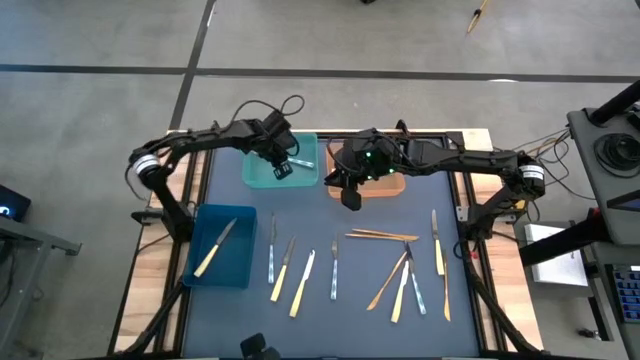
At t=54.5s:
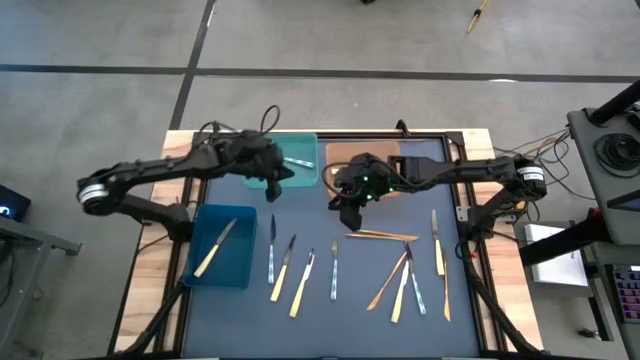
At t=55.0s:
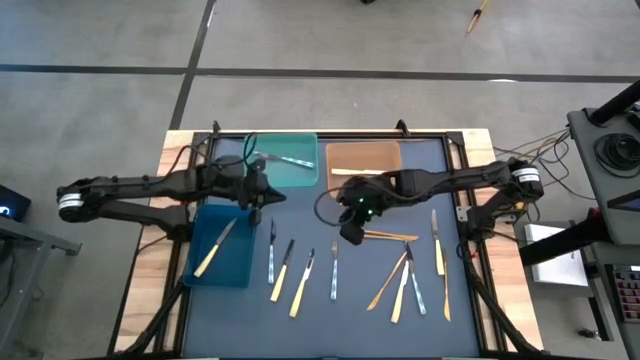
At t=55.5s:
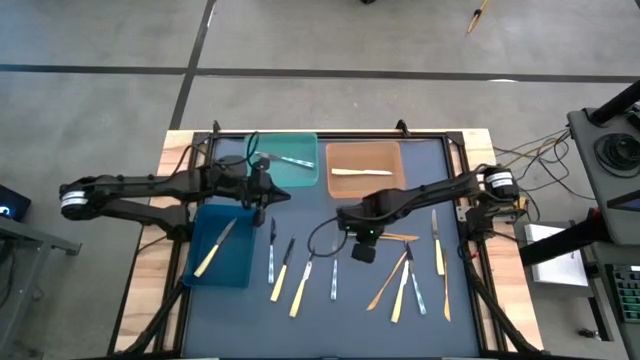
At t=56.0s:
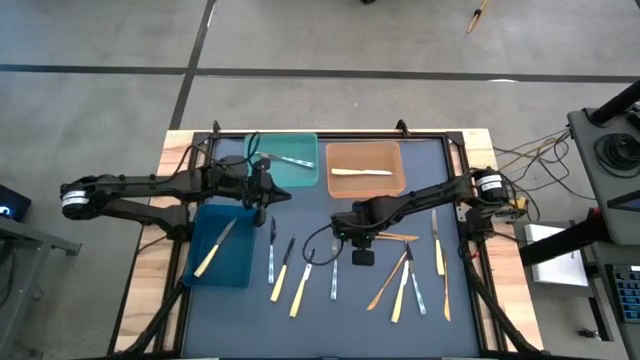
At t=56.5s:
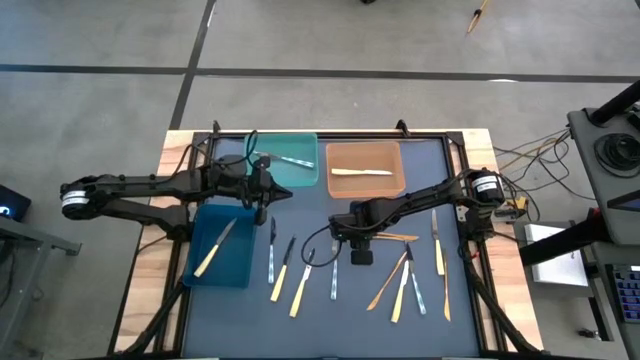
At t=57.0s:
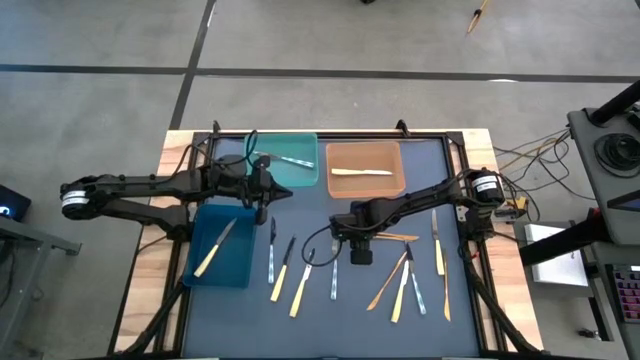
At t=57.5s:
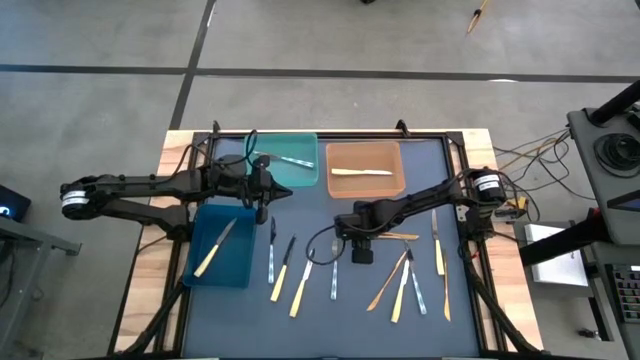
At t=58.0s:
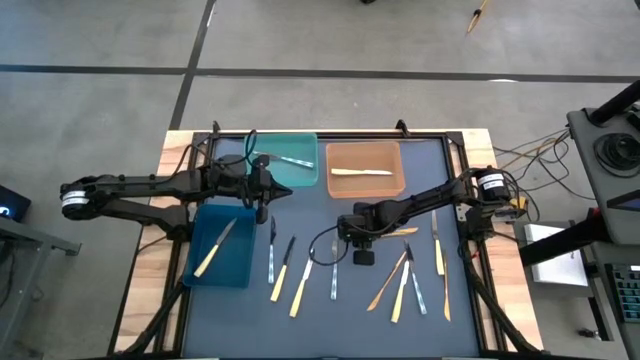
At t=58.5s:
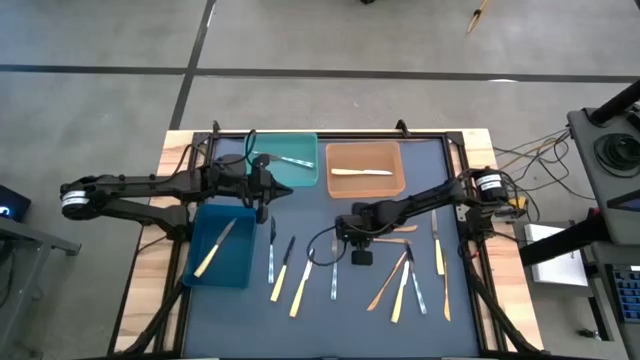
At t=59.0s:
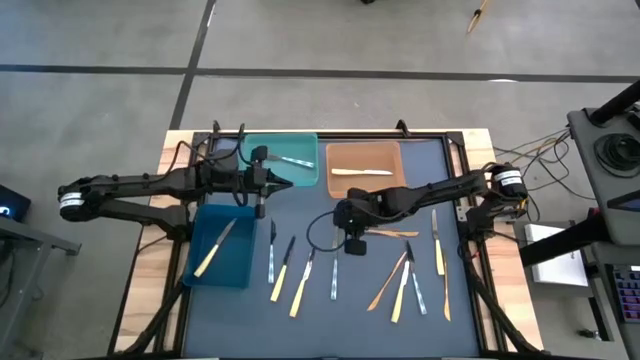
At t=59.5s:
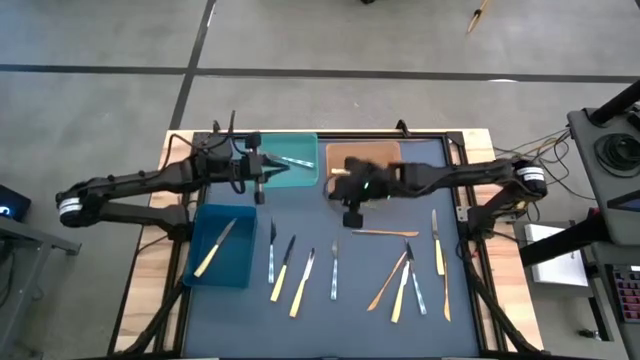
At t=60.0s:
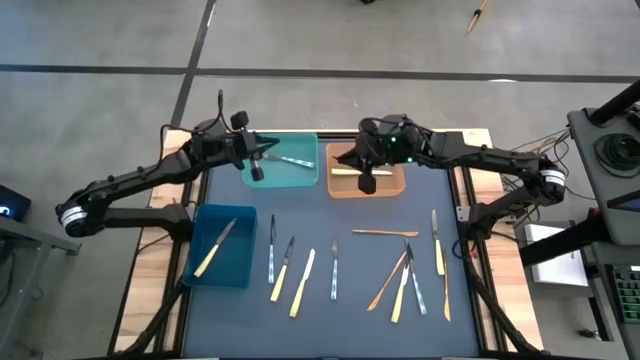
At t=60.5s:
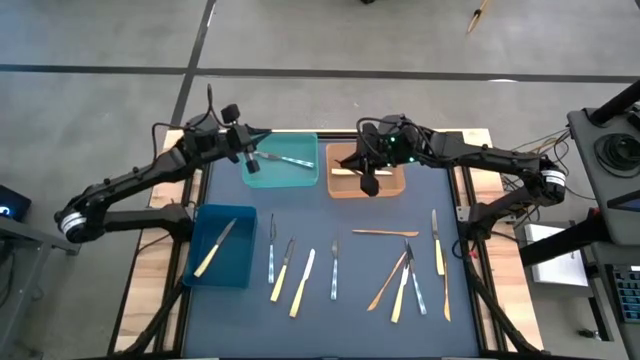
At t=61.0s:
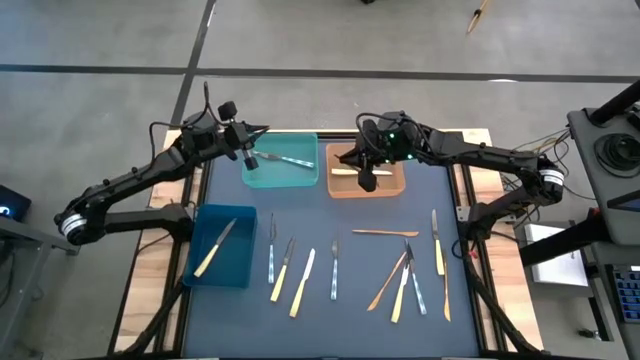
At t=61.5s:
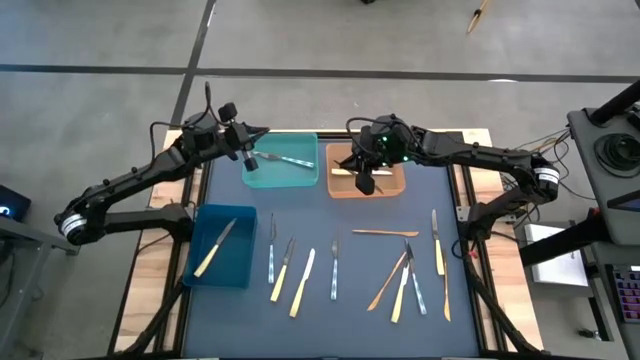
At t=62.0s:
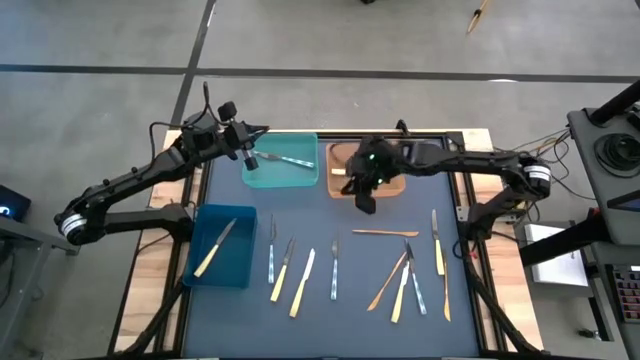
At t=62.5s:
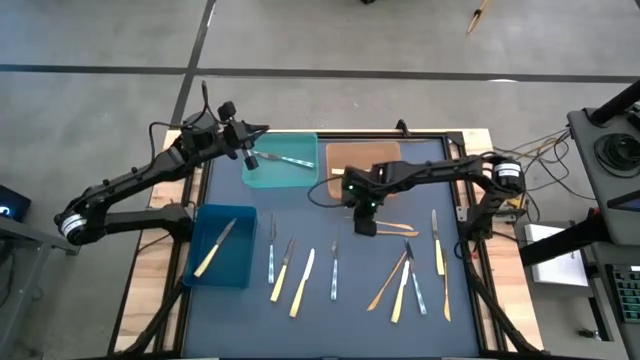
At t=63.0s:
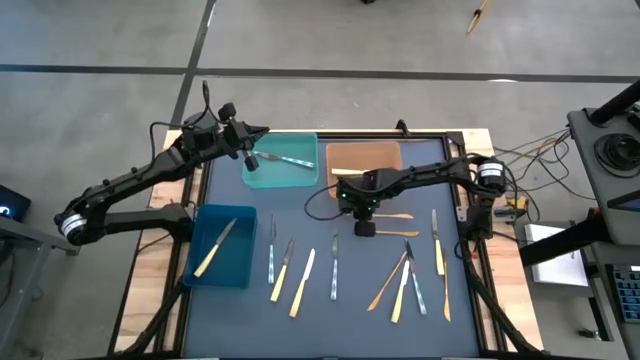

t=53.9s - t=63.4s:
Task: Sort silverware by color (type)
Put the golden knife in the orange bin

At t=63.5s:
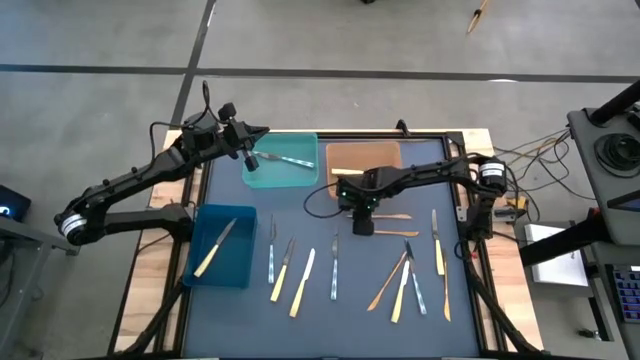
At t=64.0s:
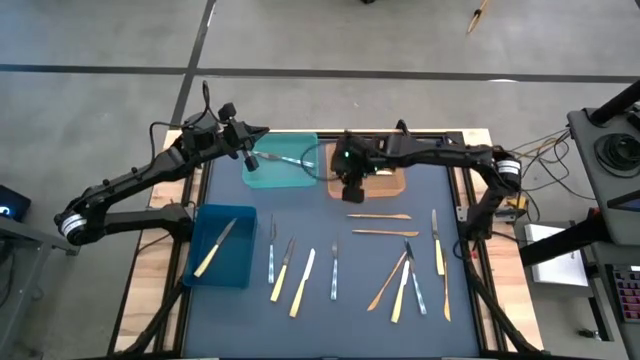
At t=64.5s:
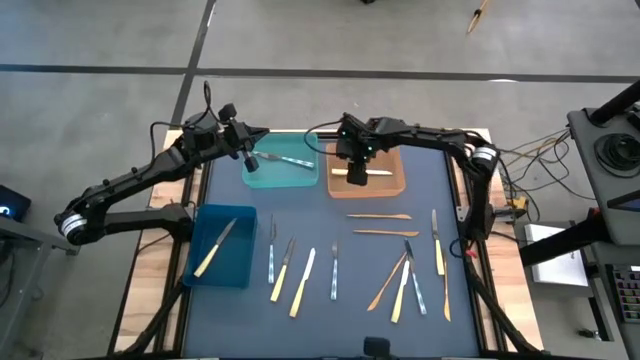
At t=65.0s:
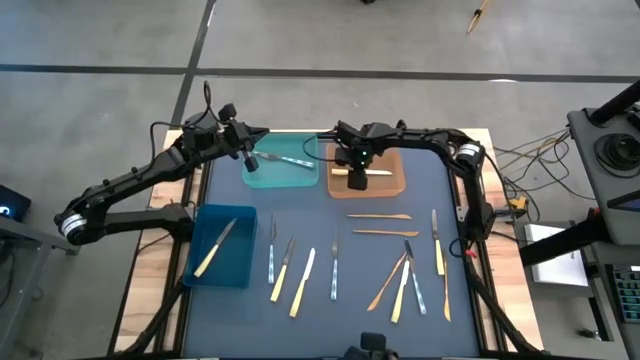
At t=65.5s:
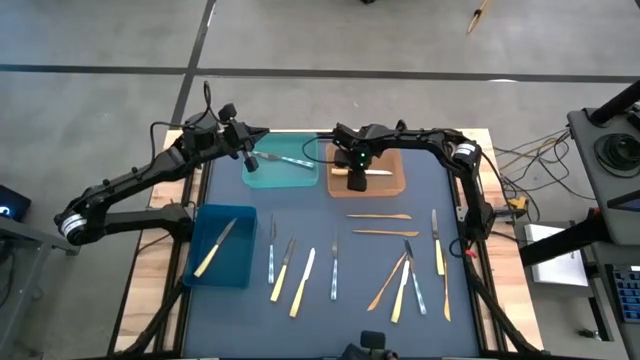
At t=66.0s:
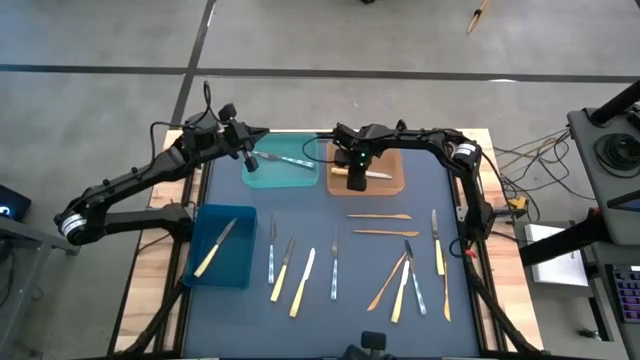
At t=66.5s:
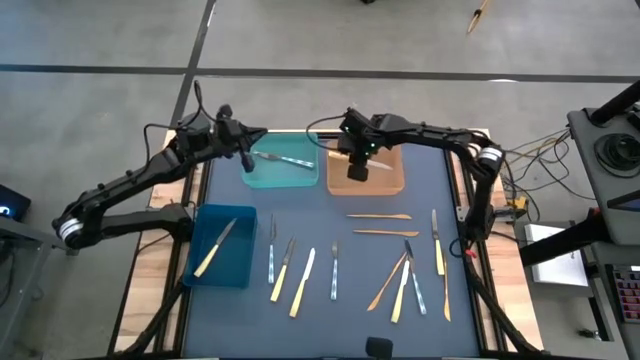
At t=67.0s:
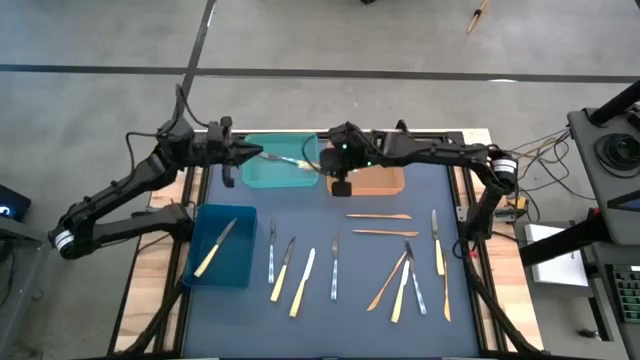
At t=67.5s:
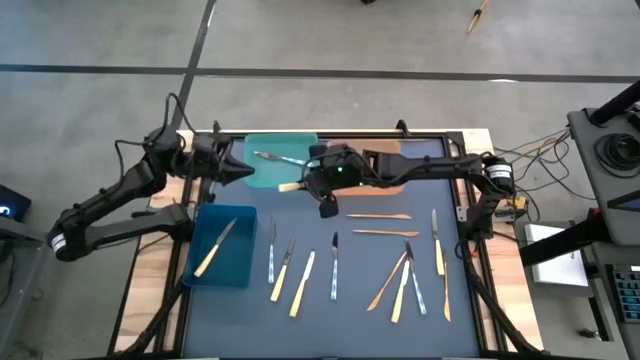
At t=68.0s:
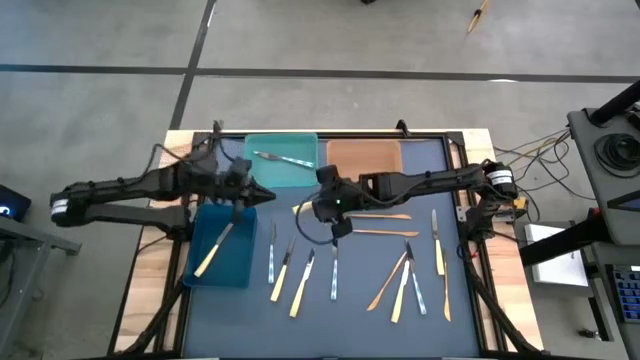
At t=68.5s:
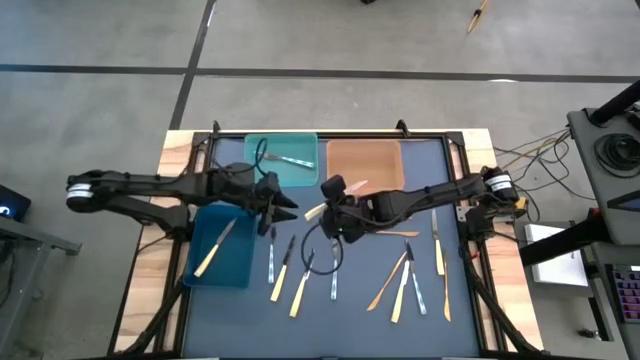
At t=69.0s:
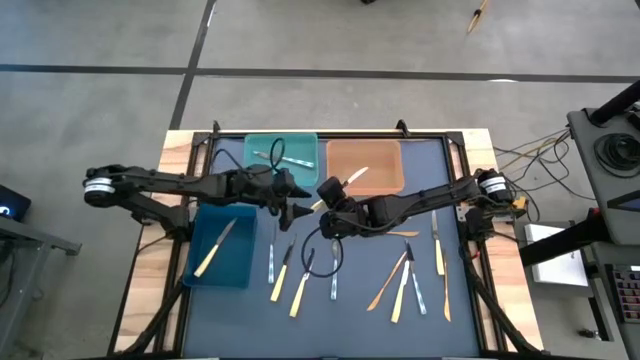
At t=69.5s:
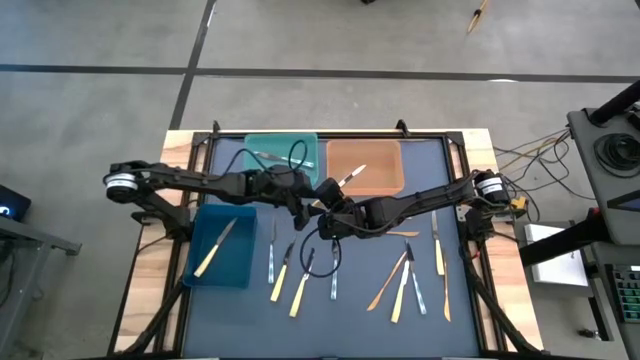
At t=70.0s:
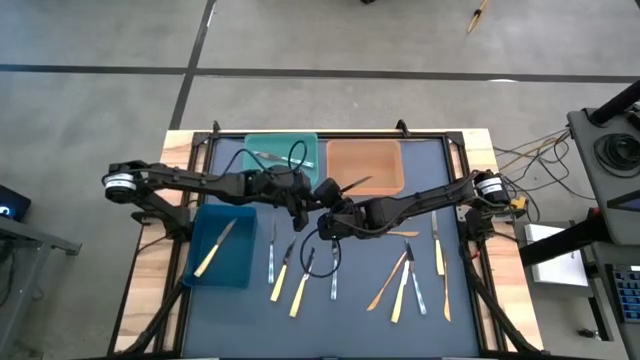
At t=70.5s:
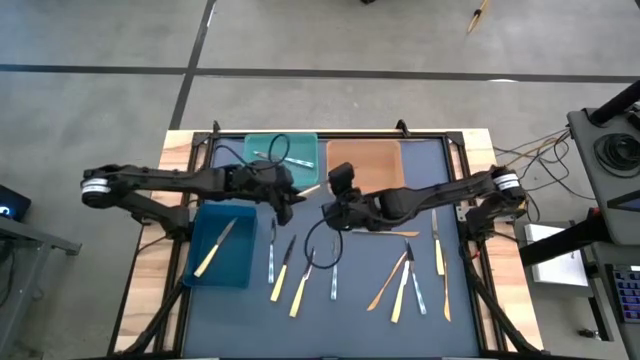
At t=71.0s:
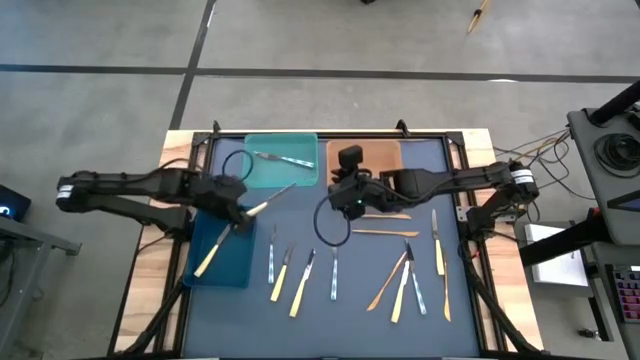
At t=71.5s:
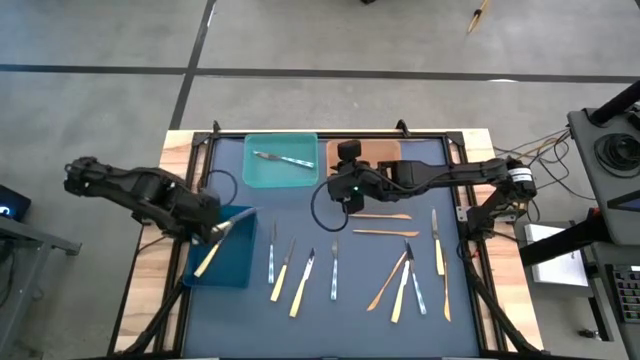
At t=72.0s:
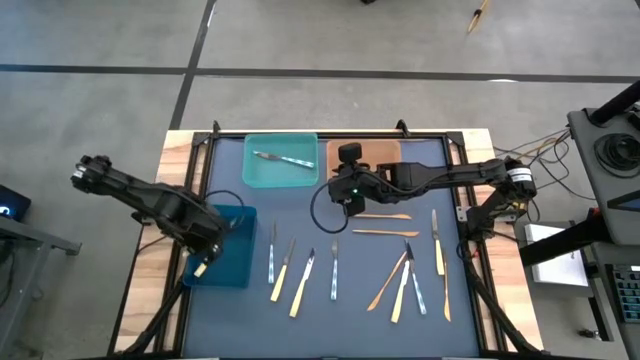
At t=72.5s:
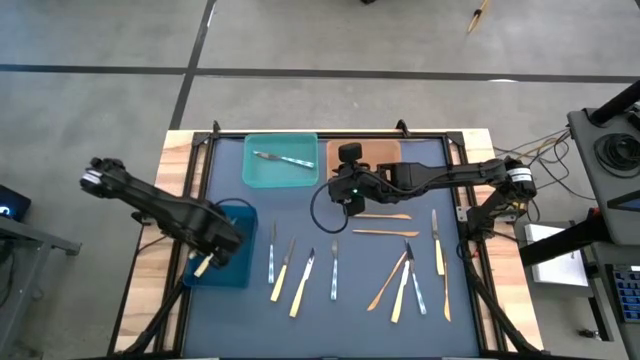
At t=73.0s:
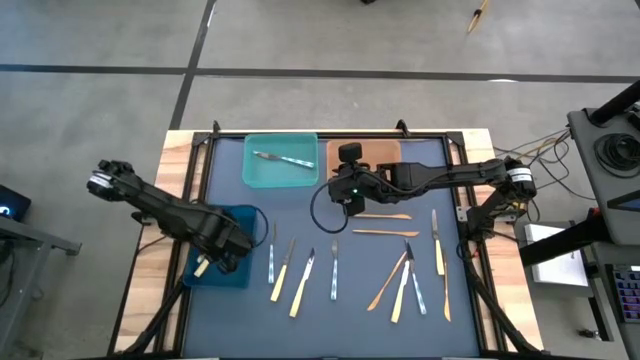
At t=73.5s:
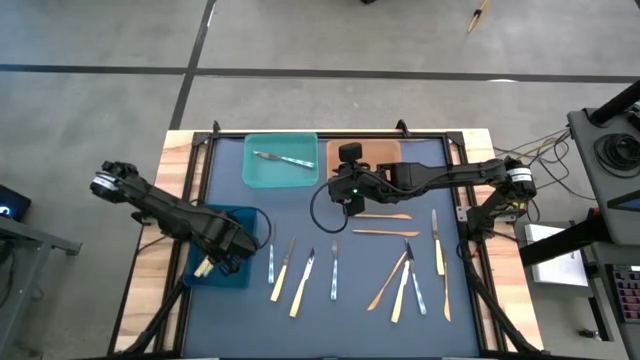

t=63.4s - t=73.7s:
Put the light yellow knife into the blue bin

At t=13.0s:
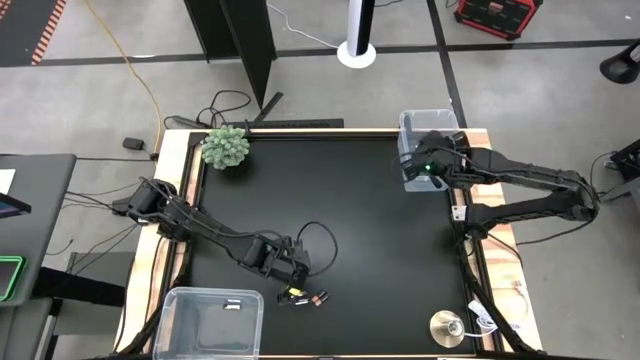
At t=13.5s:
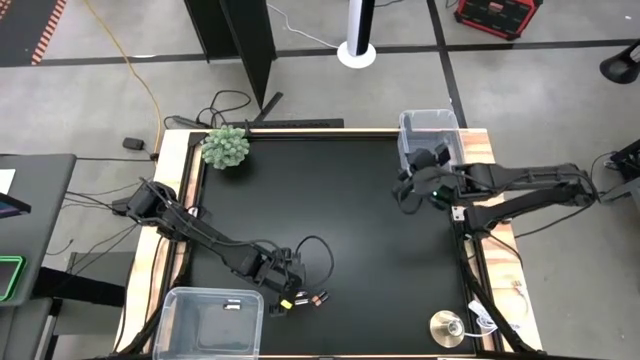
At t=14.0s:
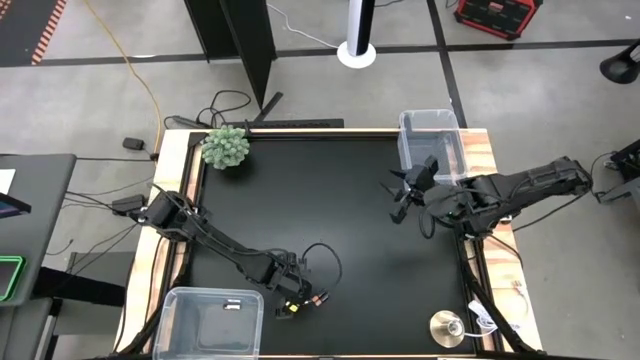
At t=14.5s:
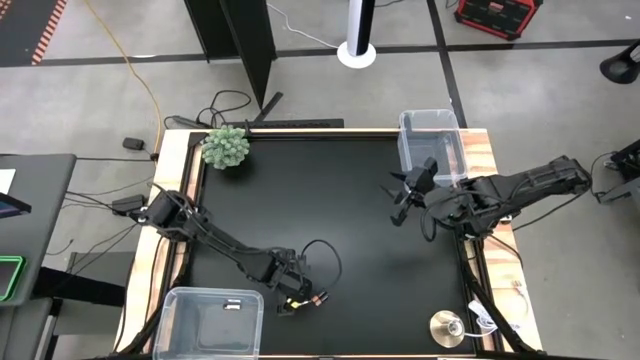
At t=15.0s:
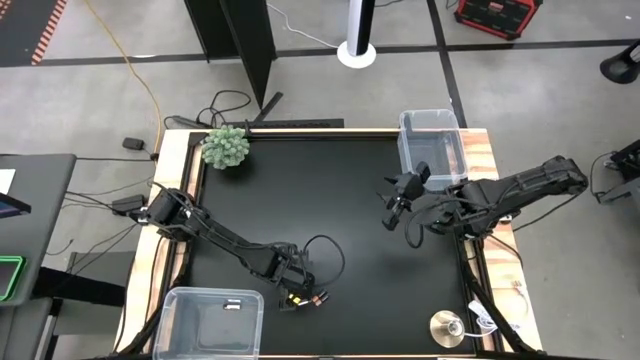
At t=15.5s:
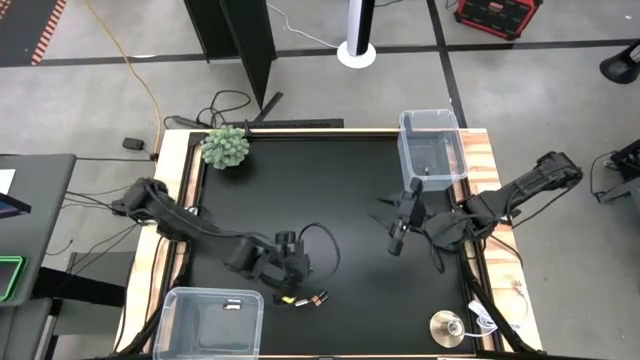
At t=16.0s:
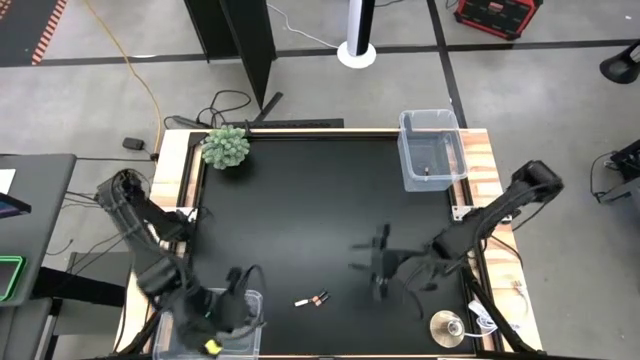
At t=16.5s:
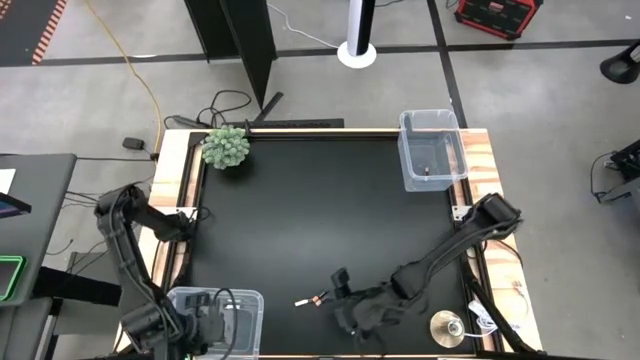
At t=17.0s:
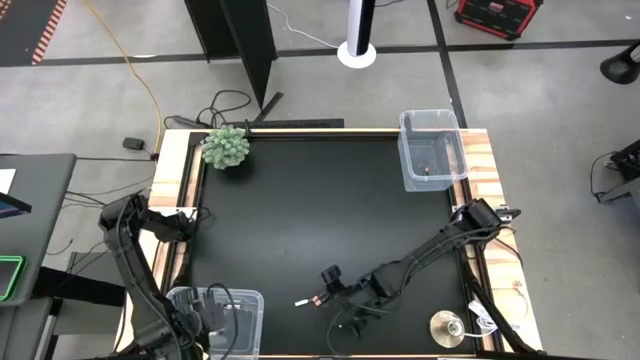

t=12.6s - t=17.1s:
Task: Sort batteries
Put the top silver battery into the bottom transparent bin
